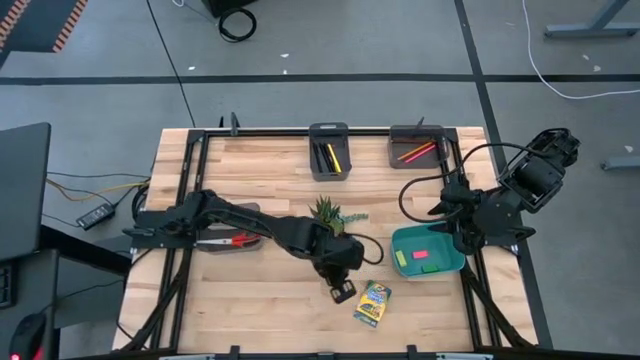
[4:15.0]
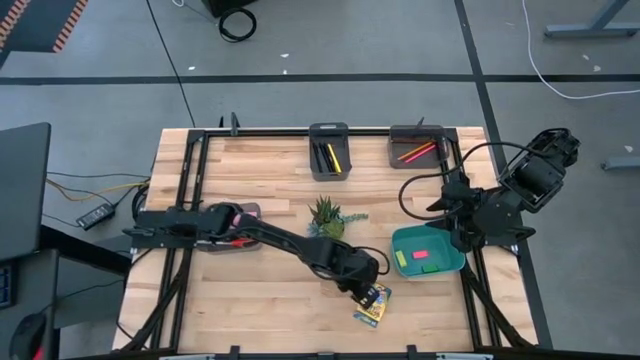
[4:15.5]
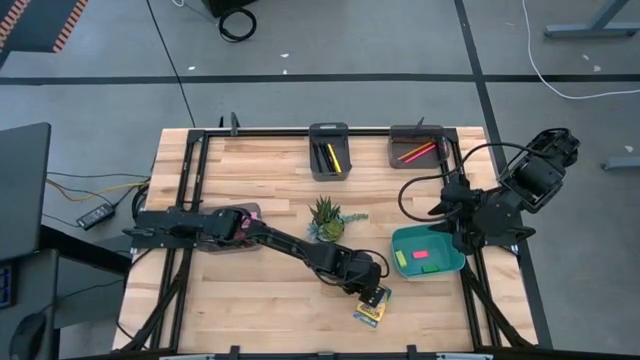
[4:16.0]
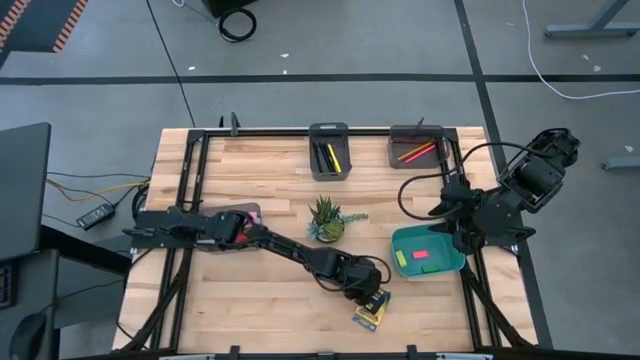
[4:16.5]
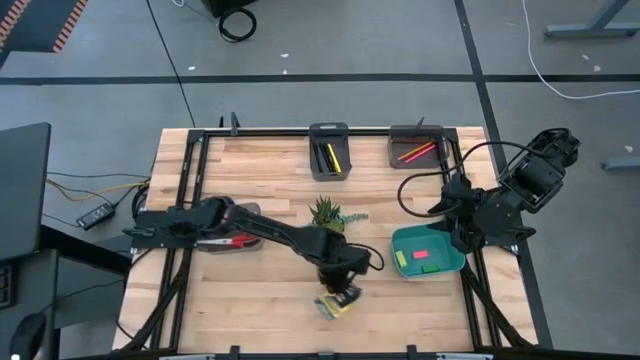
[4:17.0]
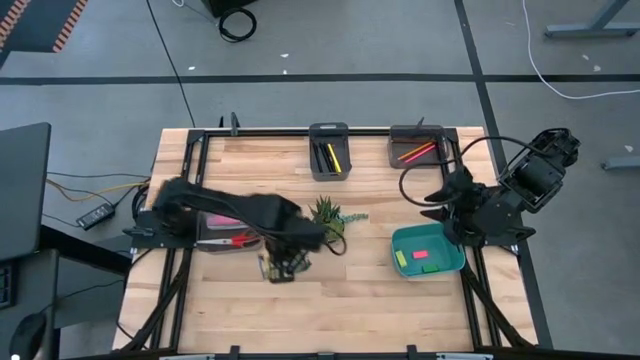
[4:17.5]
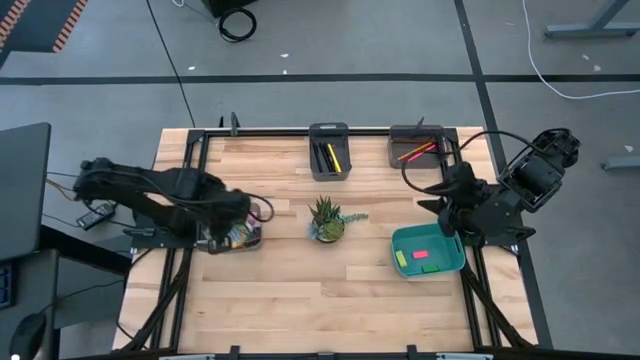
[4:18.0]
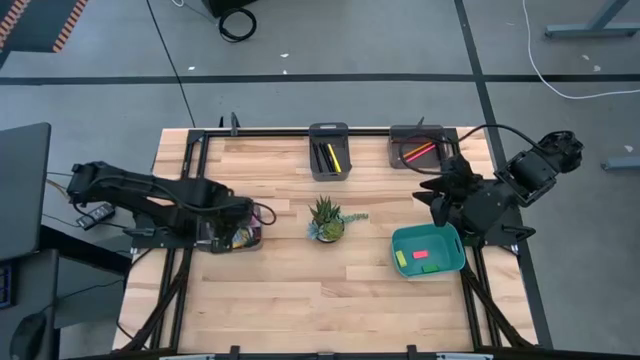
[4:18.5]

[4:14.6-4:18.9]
Task: Sort crayons/erasers/pens/pencils in bins
Put the yellow crayon box into the bottom black bin

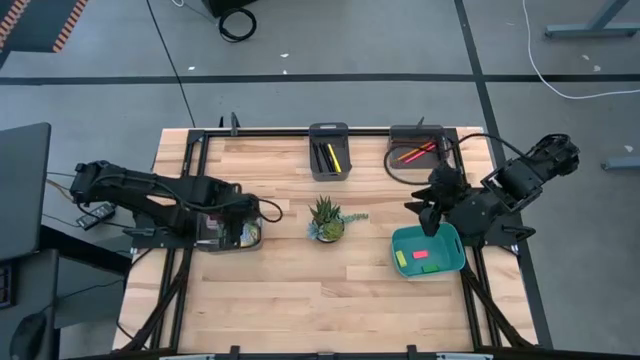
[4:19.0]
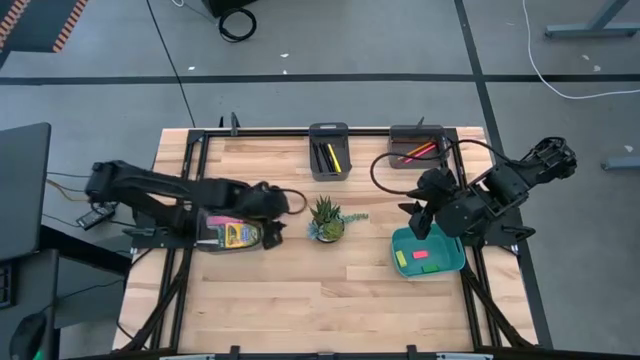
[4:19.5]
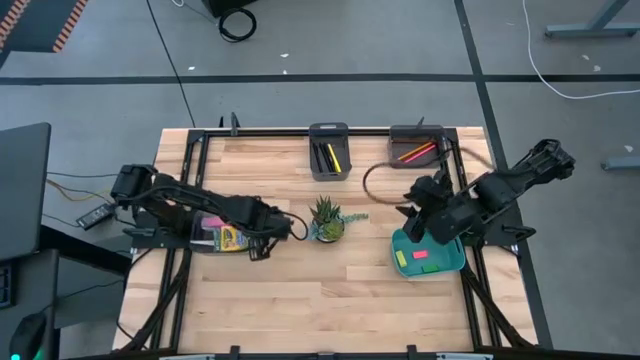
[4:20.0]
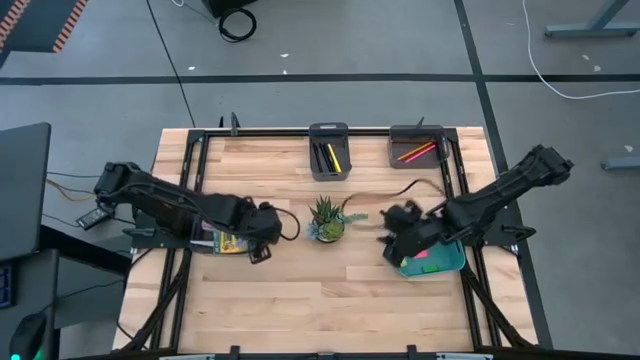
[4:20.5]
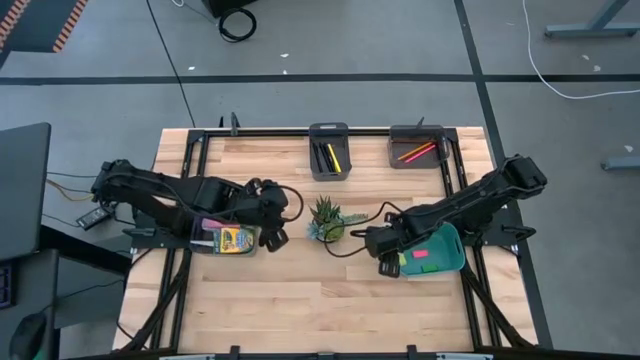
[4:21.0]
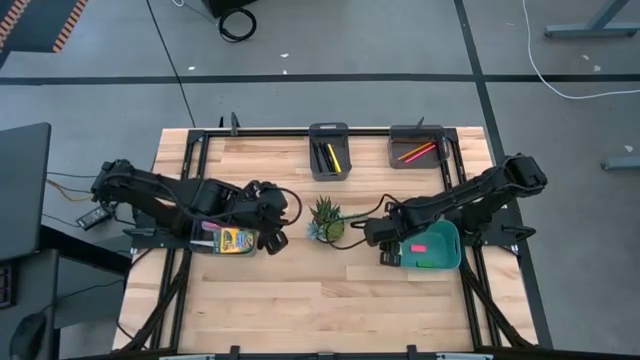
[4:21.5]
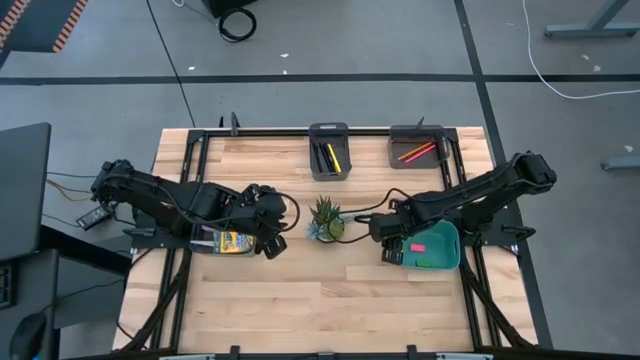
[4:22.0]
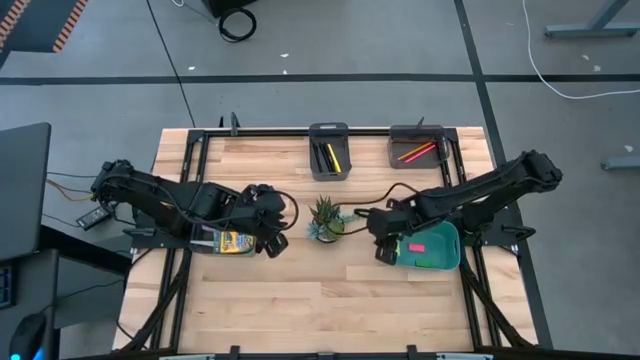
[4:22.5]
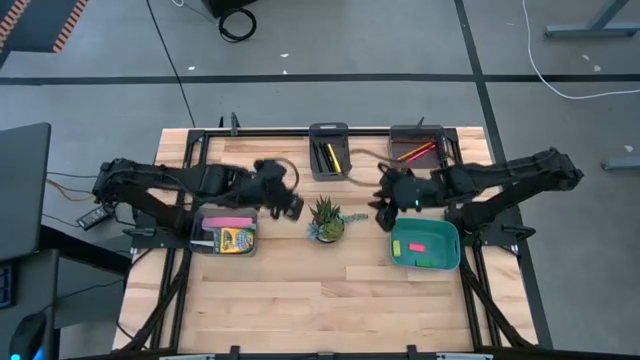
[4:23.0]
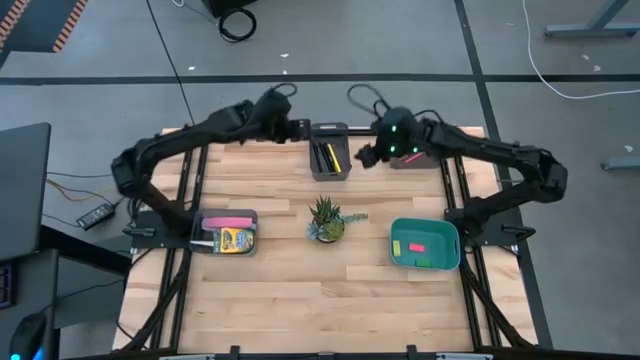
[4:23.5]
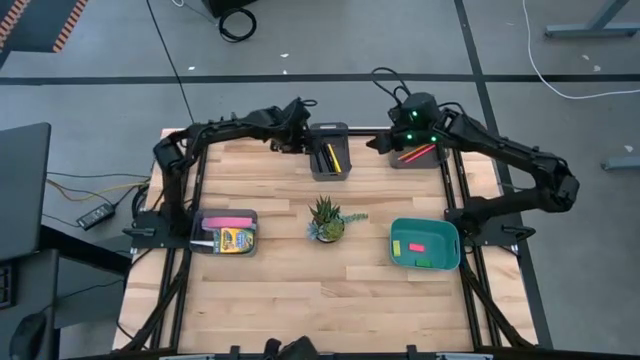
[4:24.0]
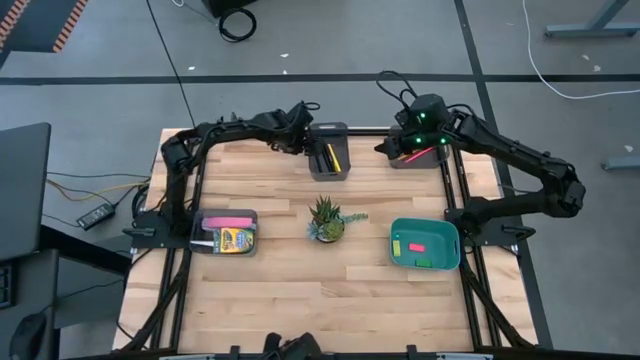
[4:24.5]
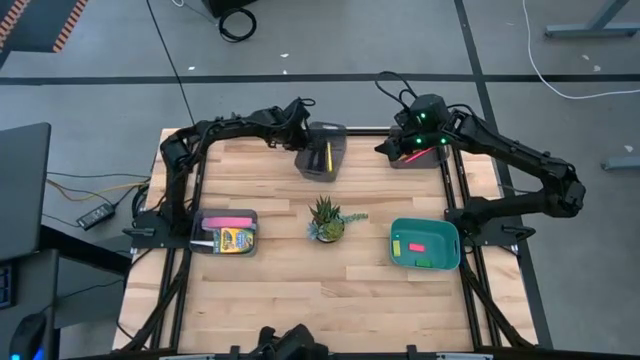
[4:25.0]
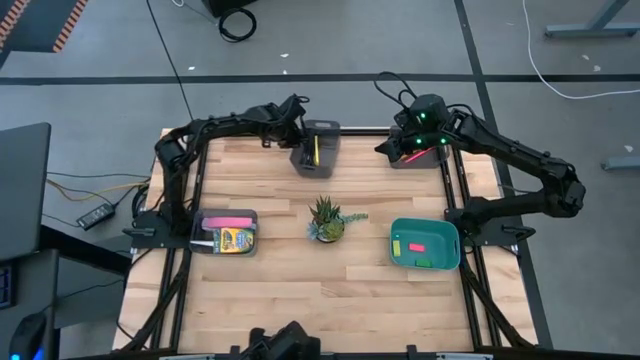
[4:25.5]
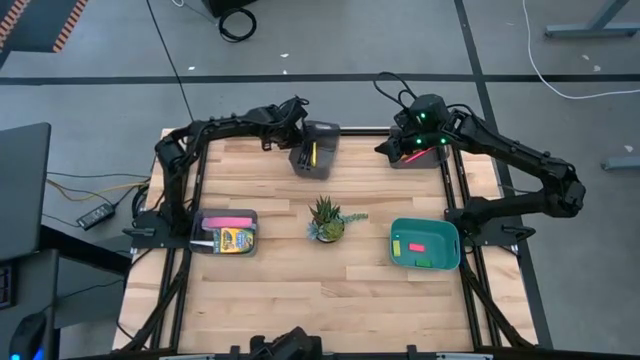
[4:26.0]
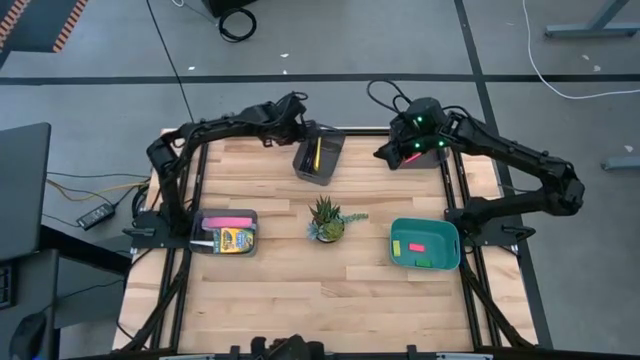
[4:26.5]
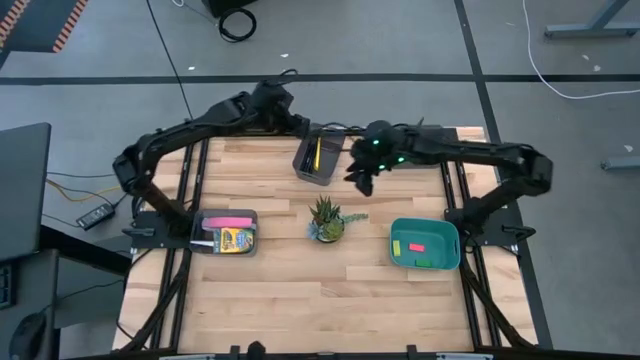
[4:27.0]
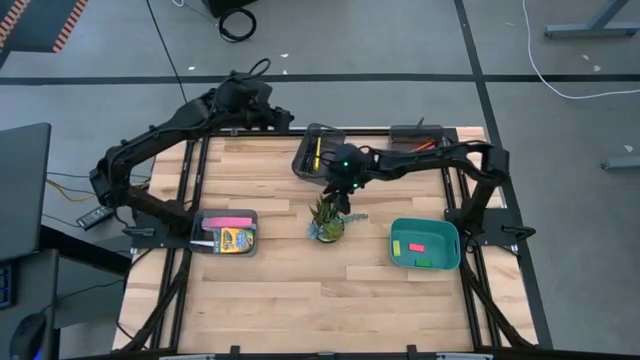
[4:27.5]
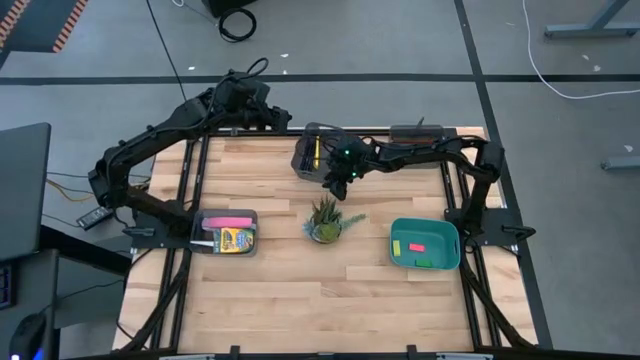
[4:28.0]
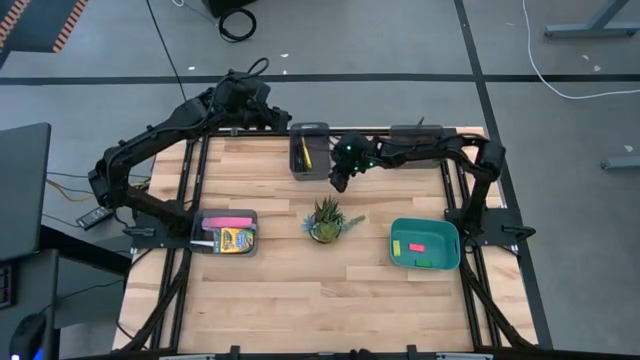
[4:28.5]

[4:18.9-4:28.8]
Adjust the bins

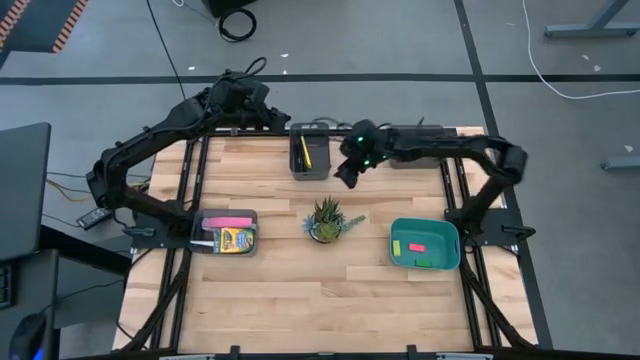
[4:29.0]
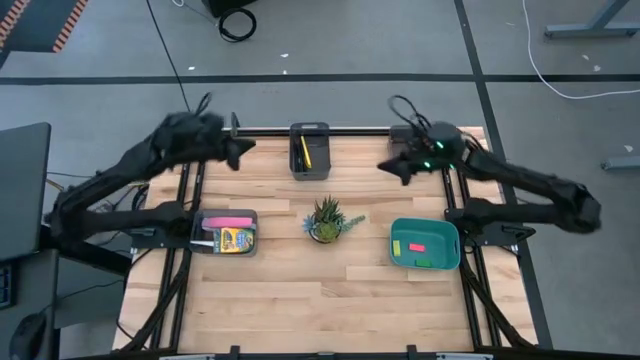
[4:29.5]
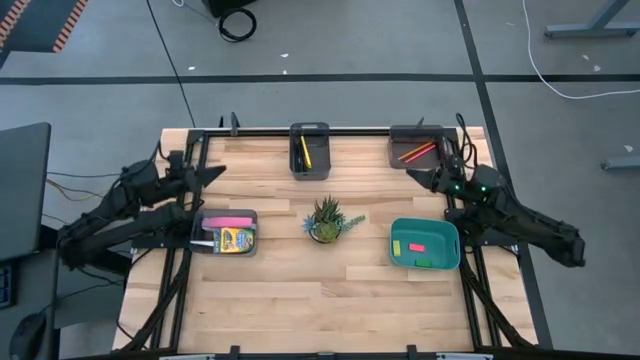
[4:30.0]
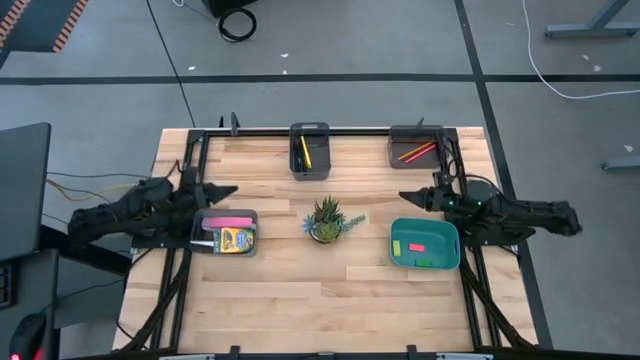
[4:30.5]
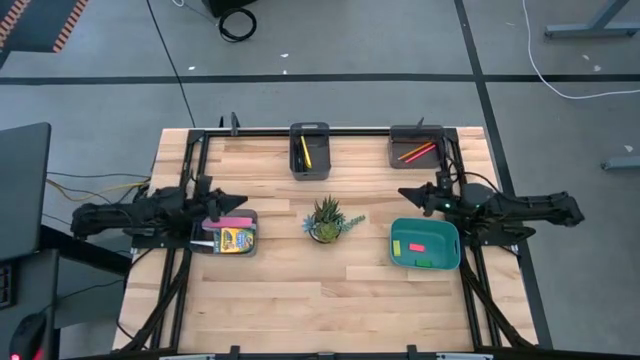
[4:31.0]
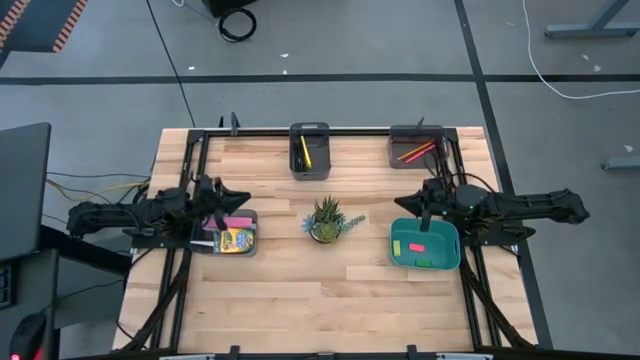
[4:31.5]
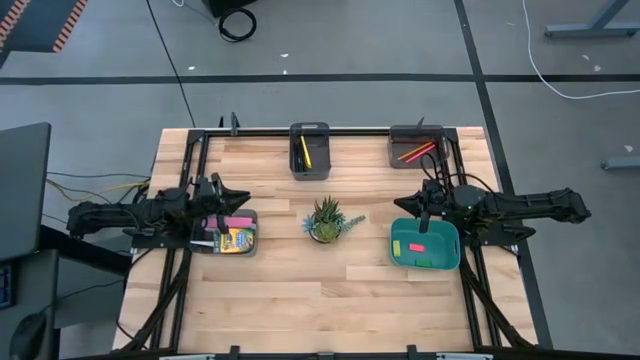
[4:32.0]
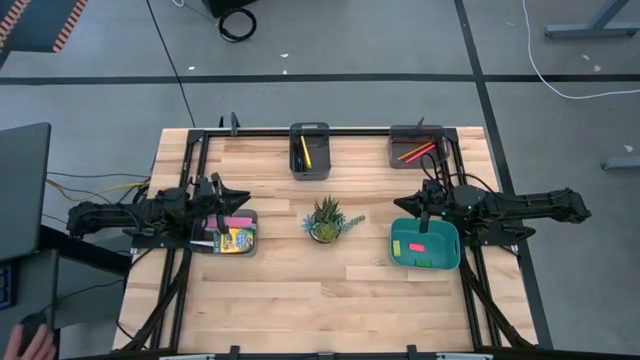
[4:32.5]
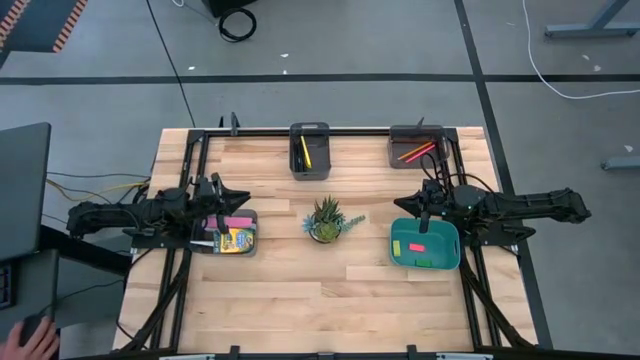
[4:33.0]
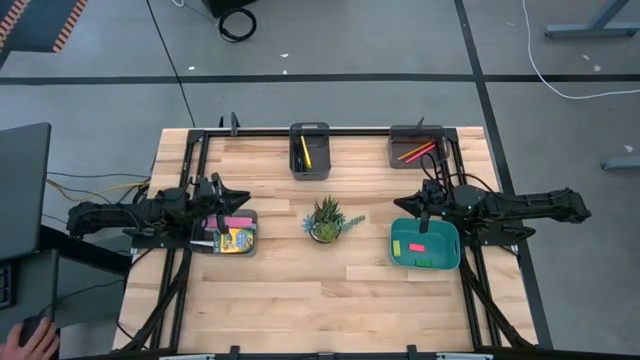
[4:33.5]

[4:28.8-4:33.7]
Return to Home Position

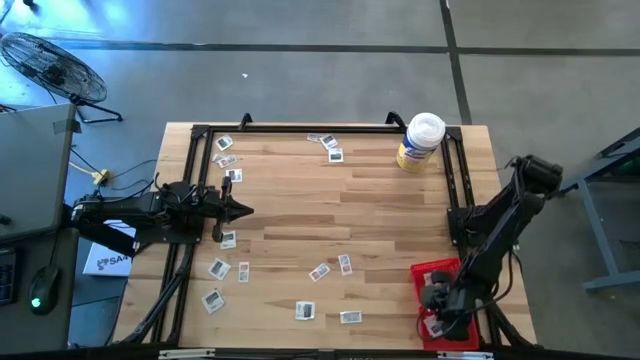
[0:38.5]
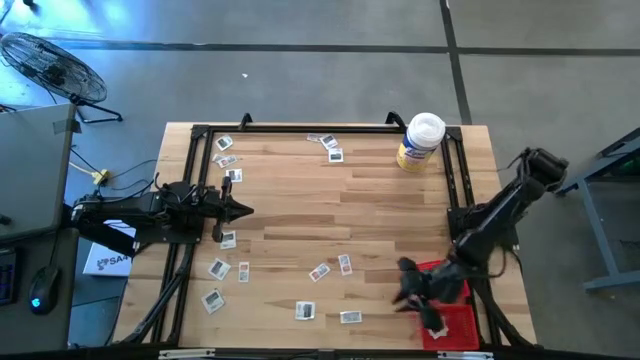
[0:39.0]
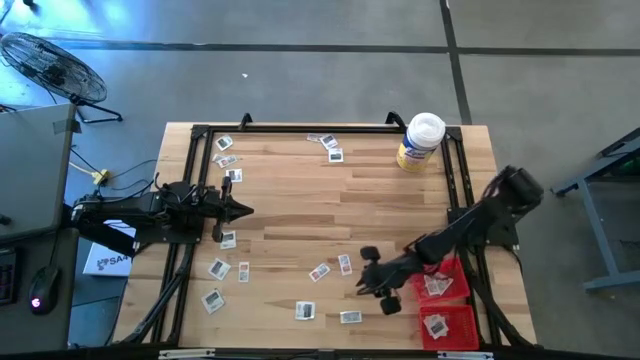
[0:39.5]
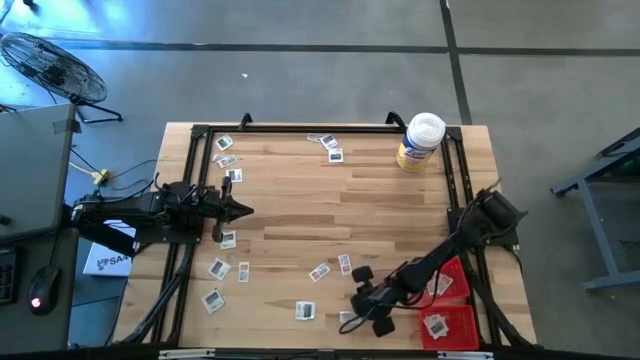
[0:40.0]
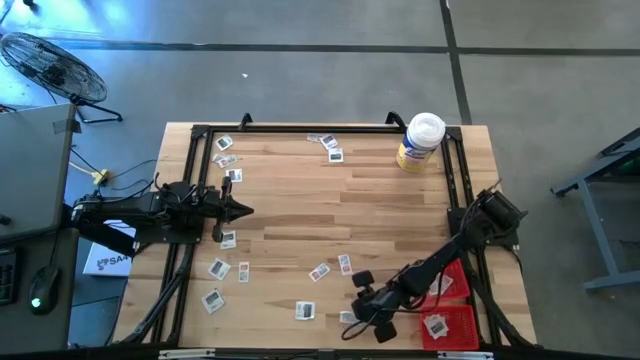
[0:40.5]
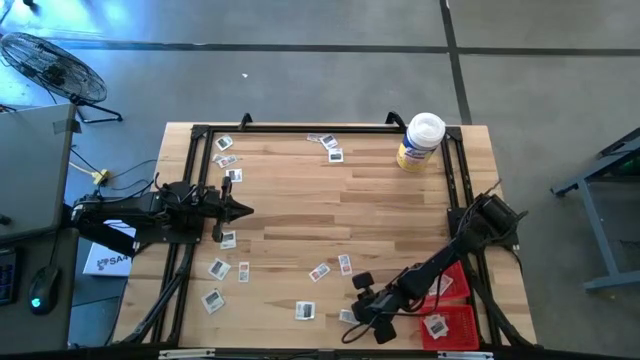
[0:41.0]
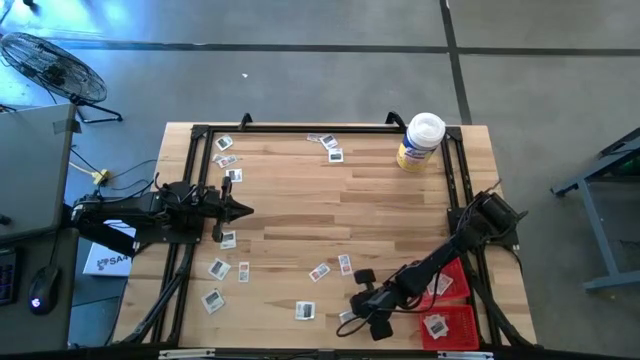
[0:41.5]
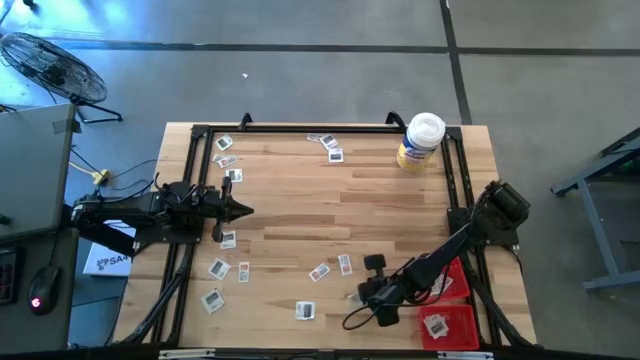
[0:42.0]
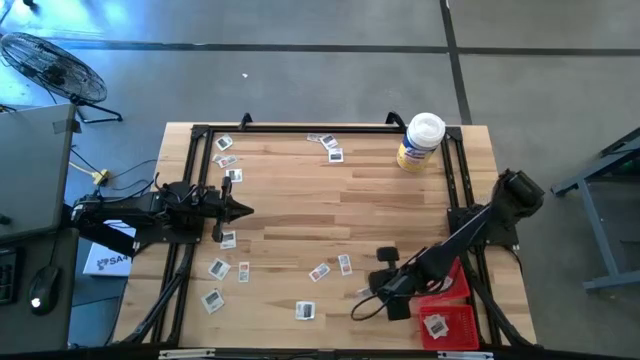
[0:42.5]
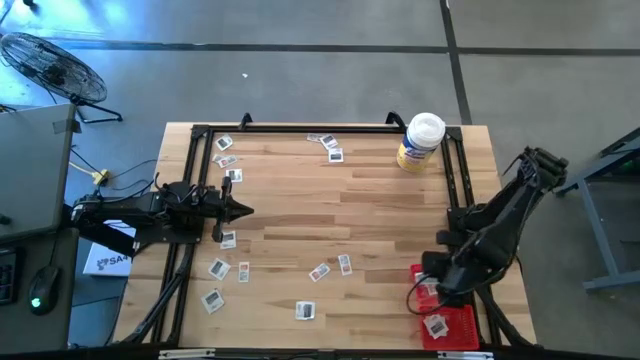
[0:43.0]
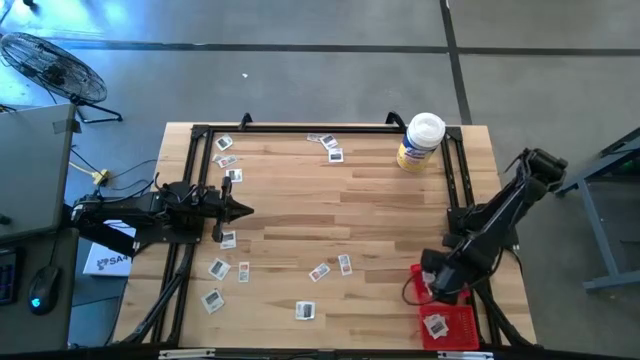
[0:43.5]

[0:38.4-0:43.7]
Task: Pick & Place First Aid Supplies
Put the white ointment pack into the top red bin
